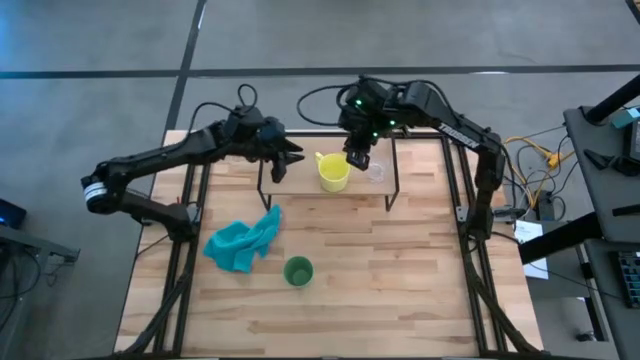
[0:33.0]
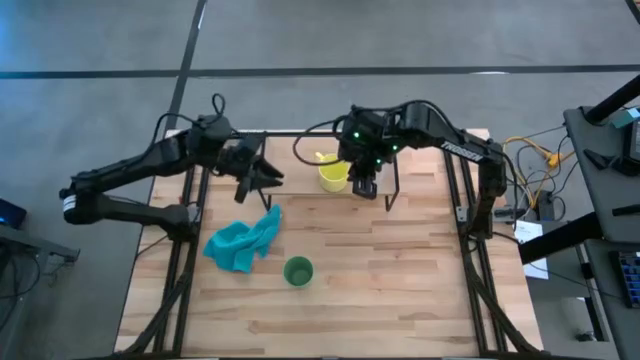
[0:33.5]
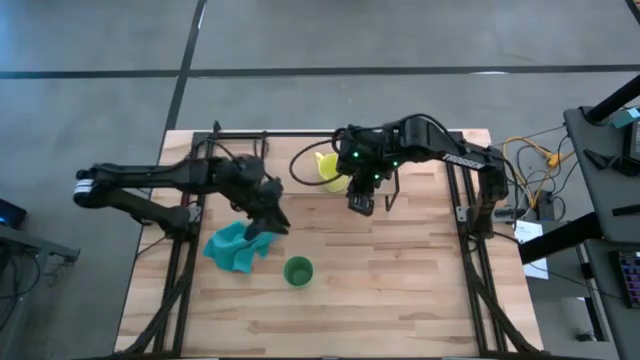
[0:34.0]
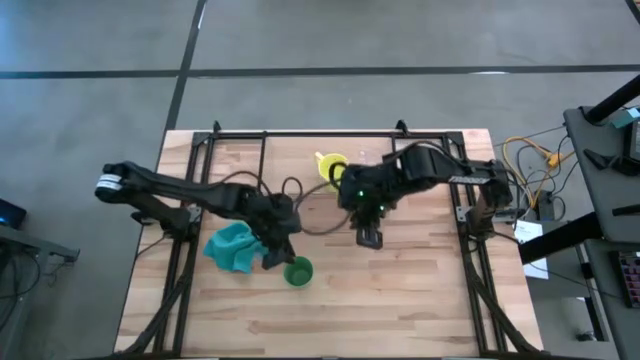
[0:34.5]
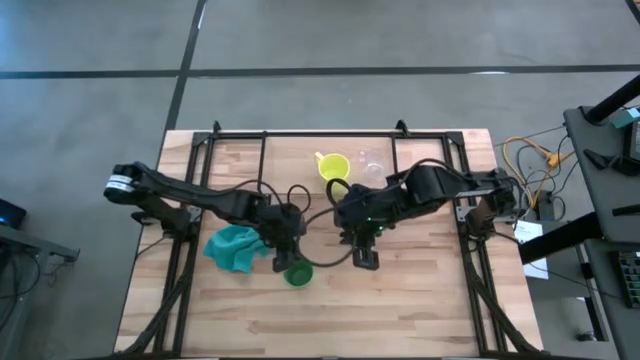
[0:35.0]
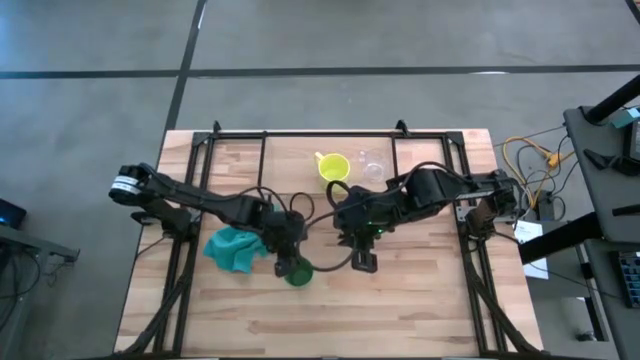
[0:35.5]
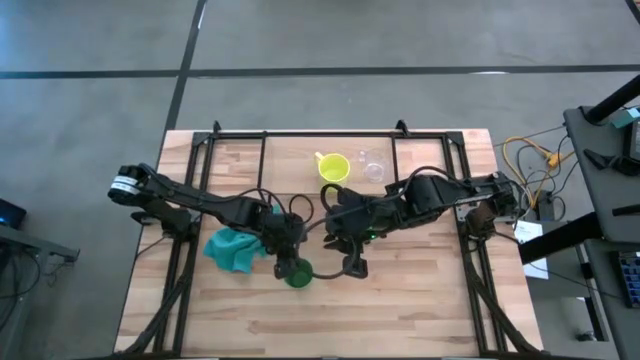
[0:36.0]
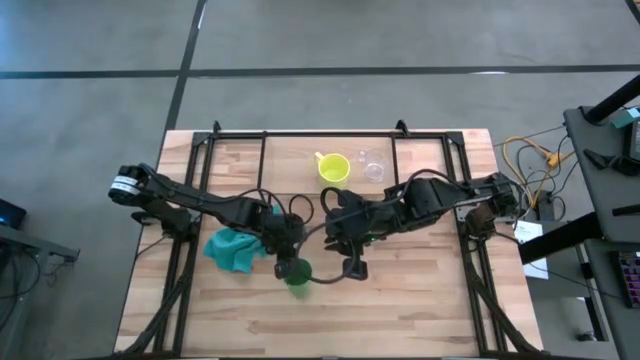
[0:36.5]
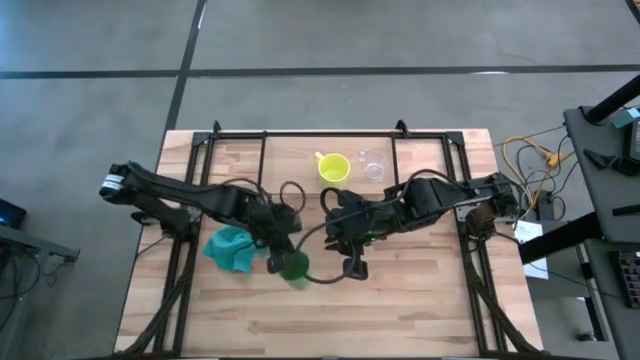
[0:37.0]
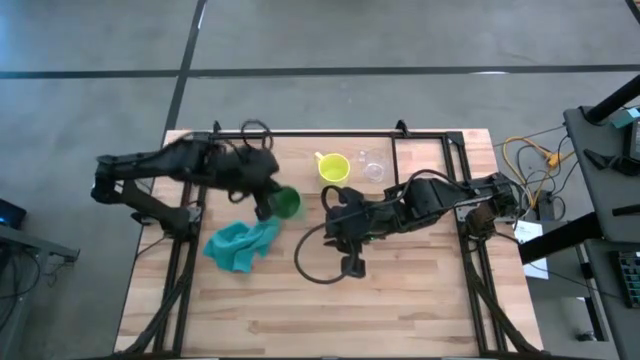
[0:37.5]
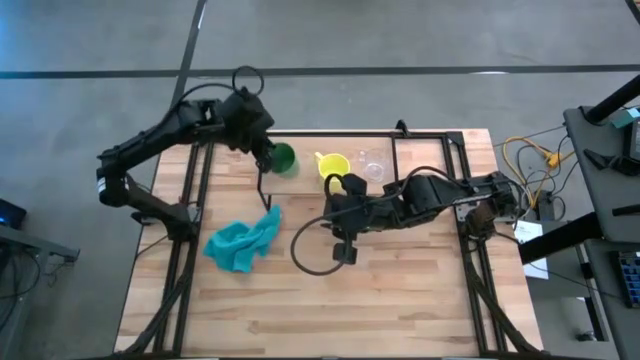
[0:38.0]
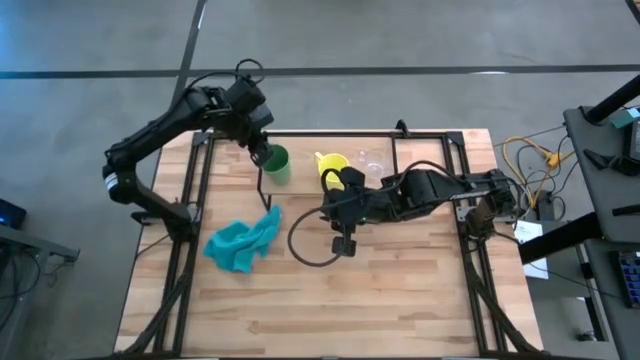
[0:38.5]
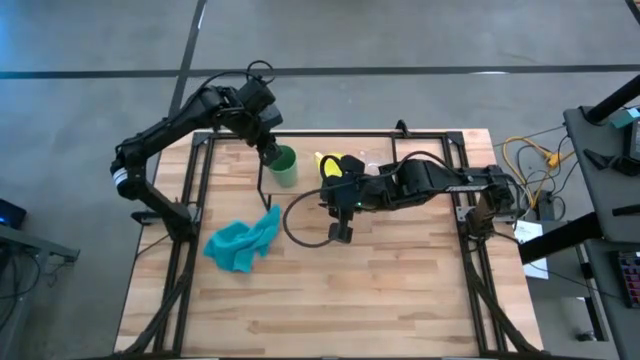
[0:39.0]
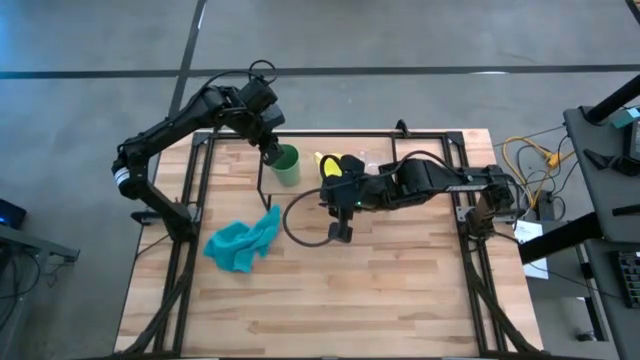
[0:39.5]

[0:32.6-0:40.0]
Task: Stack small to large cups/mugs on shelf
Put the green cup on the shelf

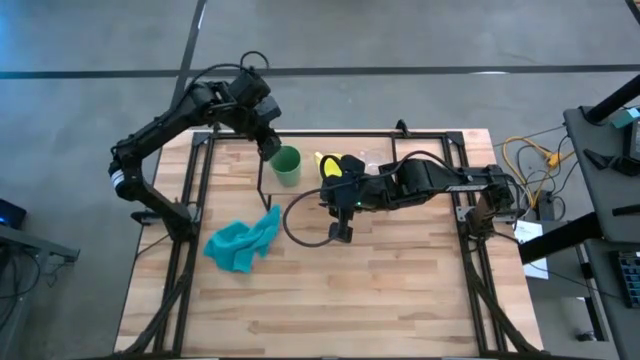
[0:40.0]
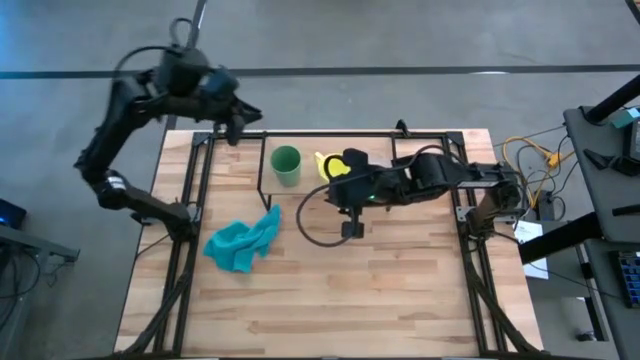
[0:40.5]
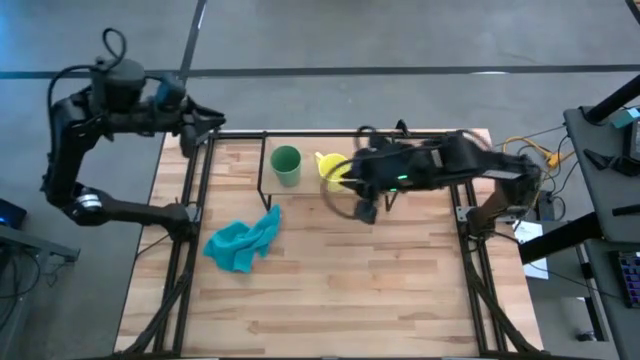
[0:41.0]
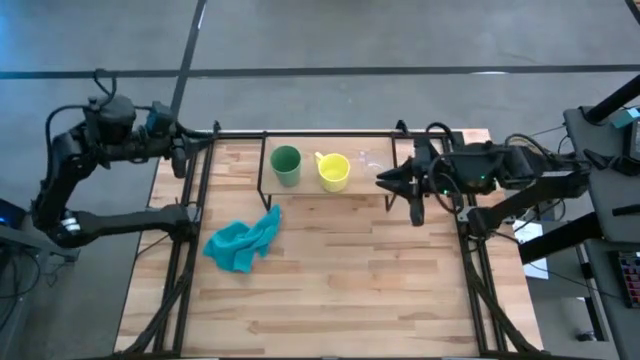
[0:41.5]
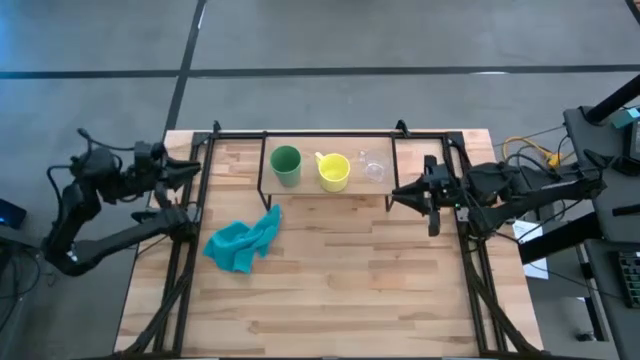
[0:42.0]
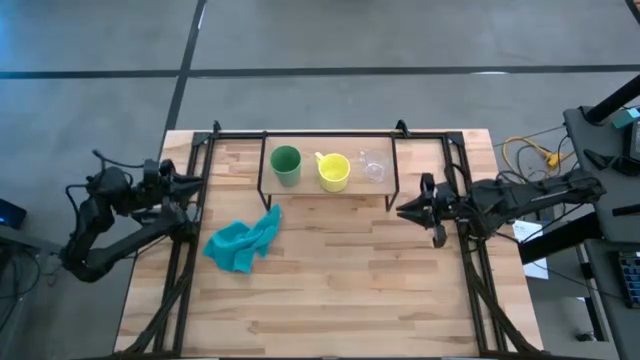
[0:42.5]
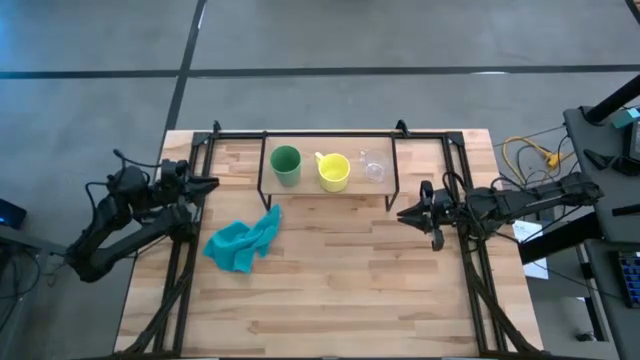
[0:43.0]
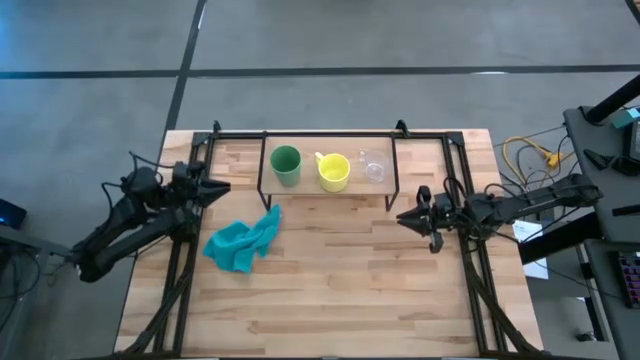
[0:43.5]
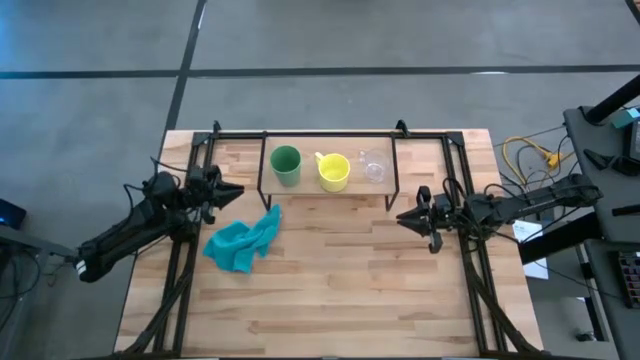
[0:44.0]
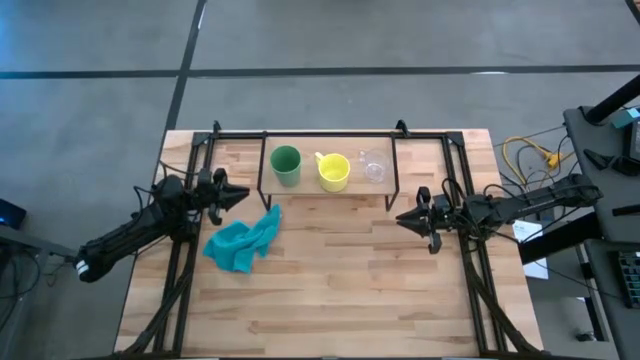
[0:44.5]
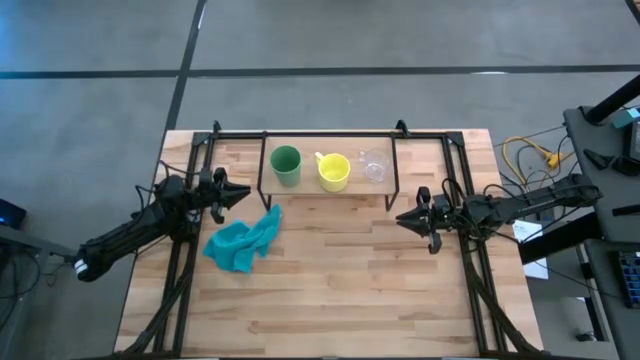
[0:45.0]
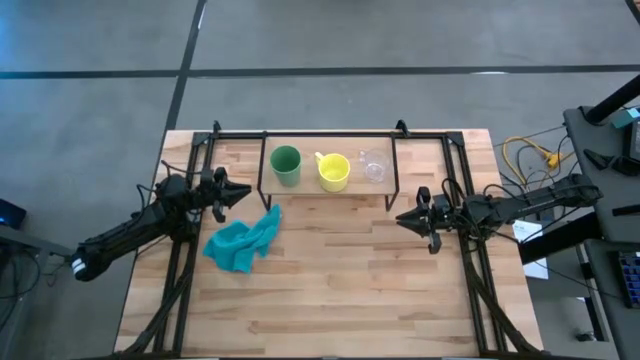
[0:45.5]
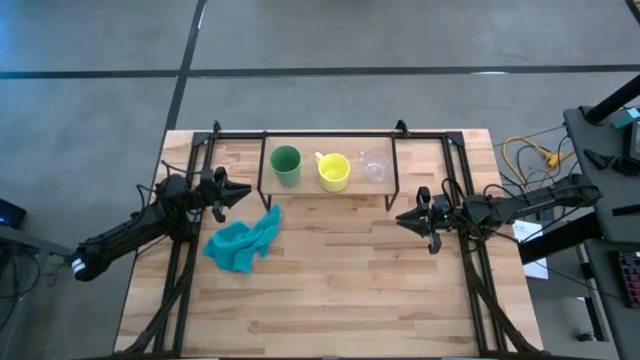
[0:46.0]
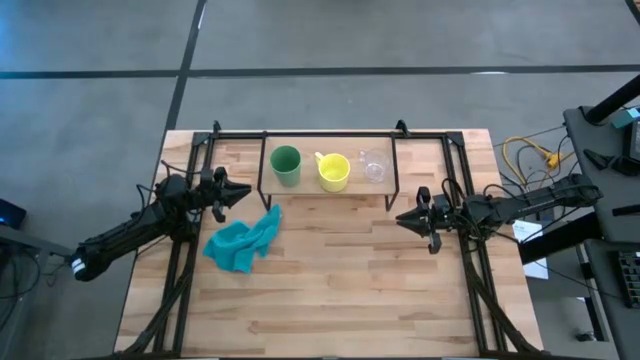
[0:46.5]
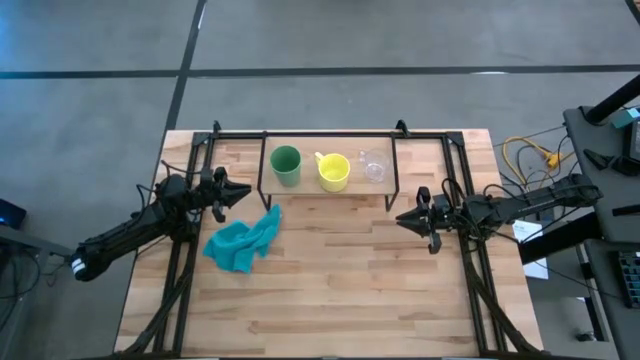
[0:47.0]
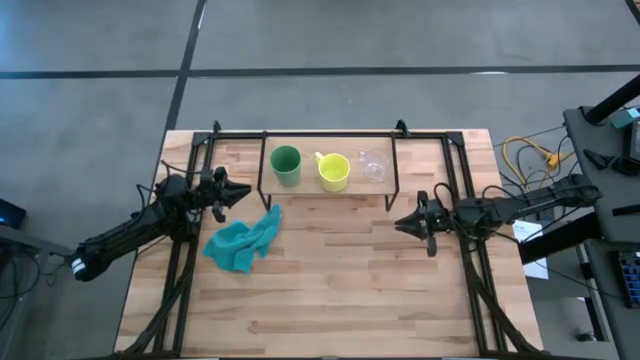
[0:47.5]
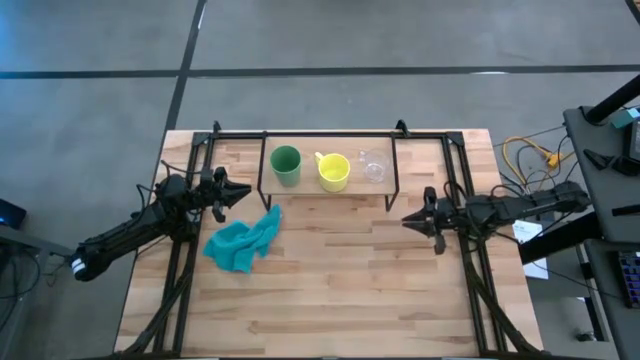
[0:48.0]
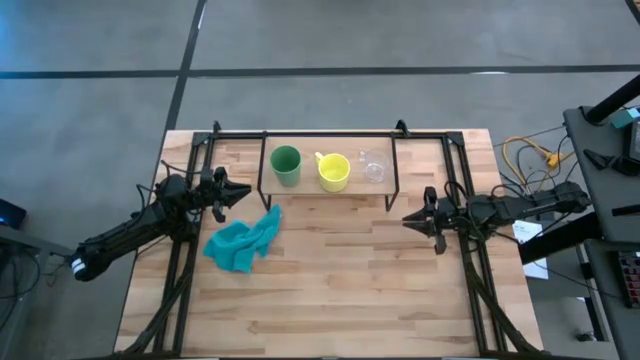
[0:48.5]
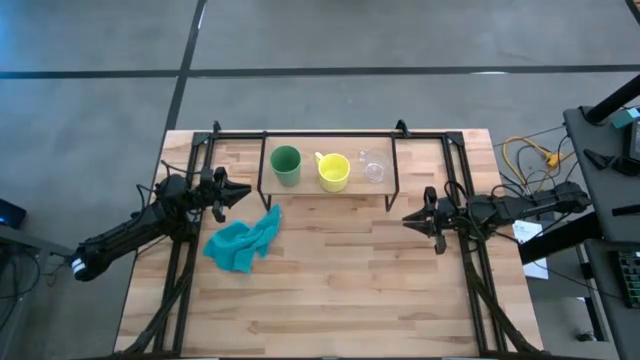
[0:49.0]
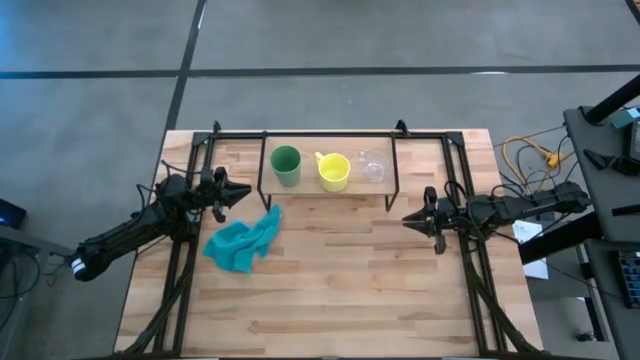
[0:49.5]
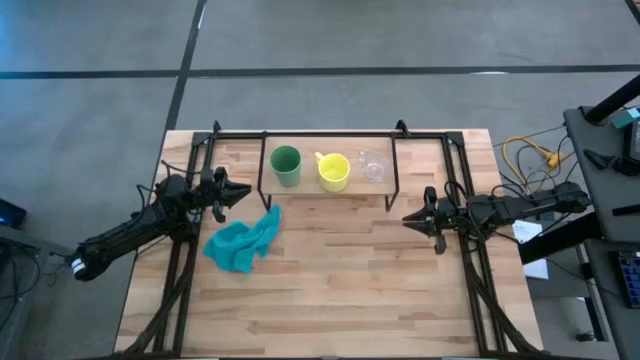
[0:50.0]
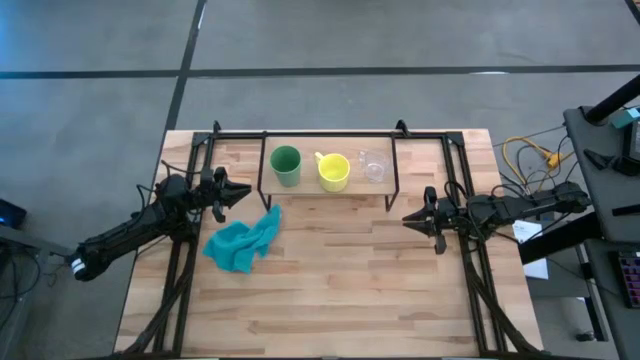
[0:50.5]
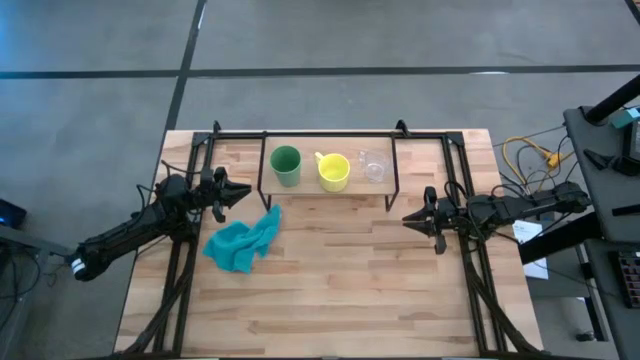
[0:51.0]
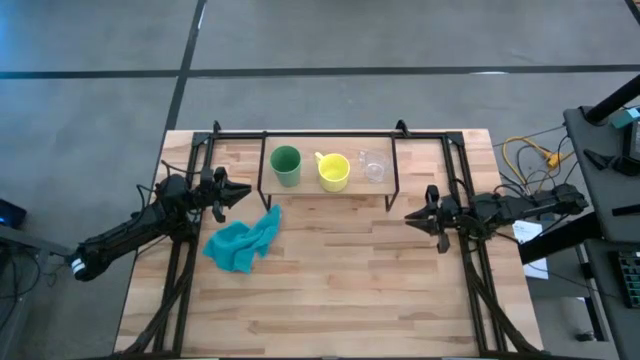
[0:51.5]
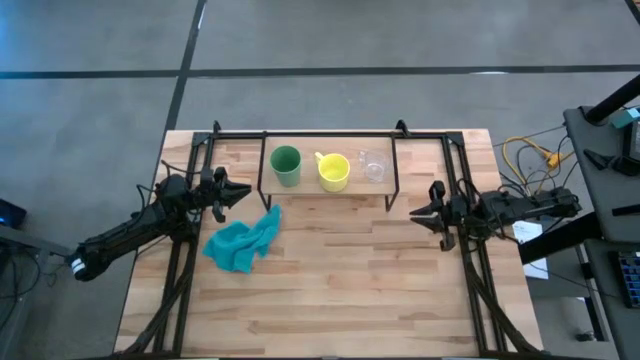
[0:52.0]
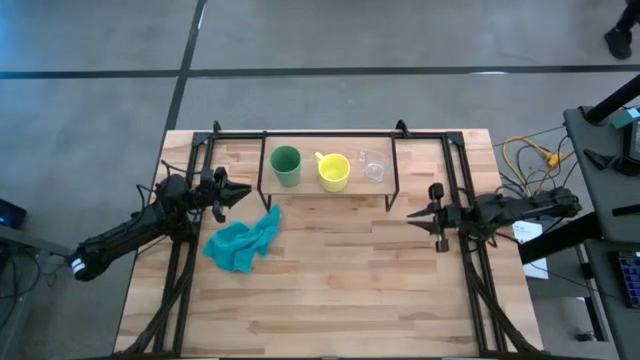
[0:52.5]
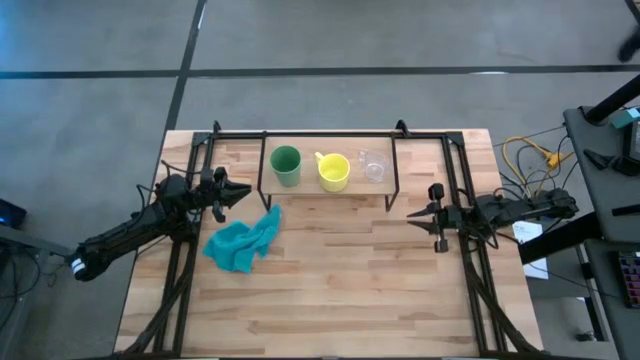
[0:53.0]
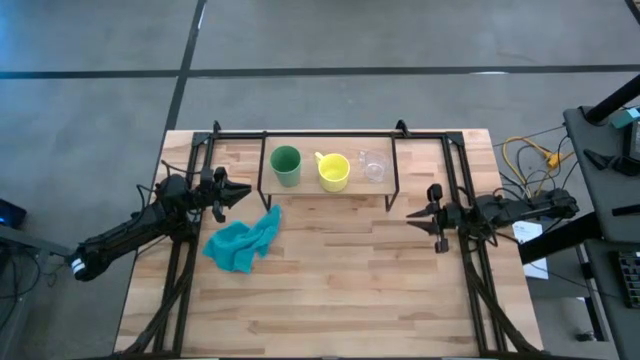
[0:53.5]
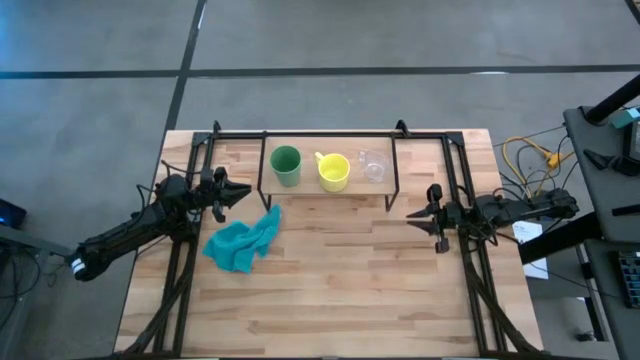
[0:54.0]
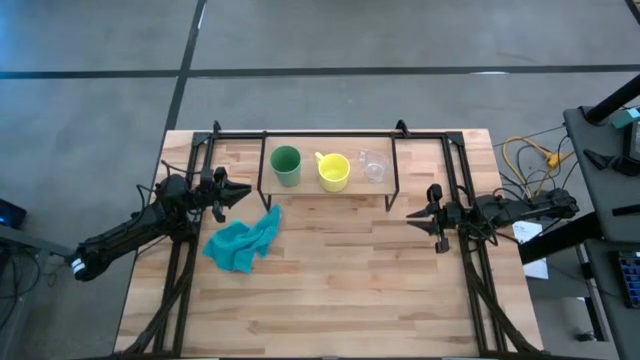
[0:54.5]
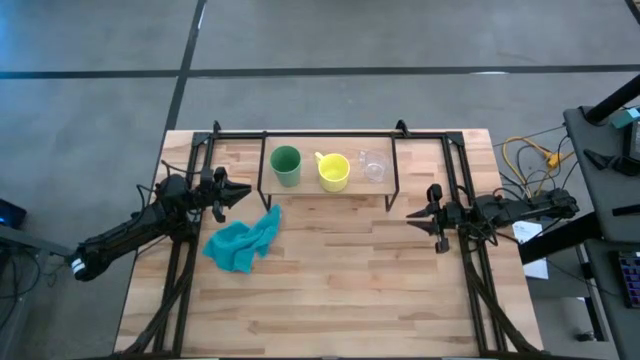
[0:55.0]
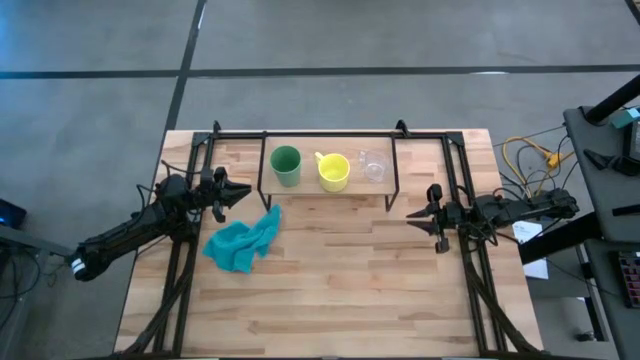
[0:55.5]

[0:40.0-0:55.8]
Return to Home Position
